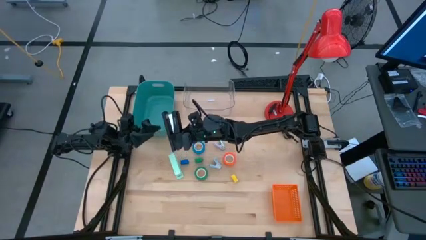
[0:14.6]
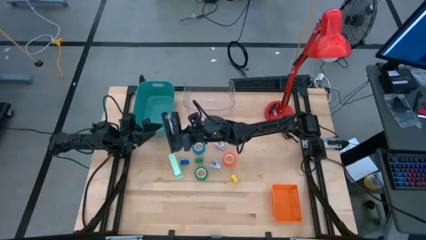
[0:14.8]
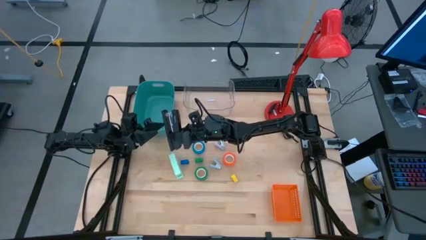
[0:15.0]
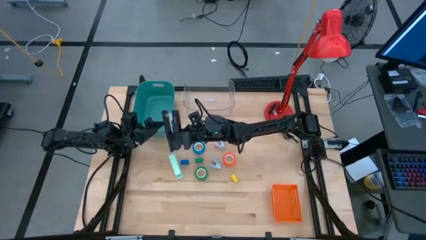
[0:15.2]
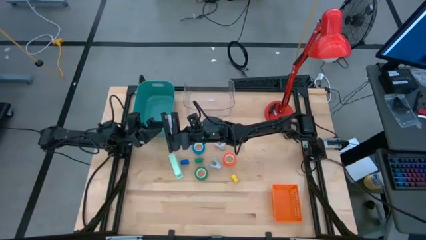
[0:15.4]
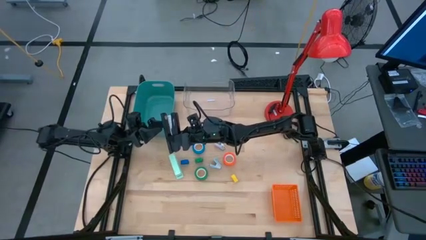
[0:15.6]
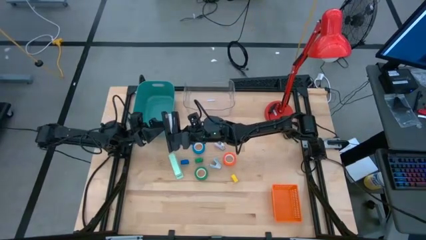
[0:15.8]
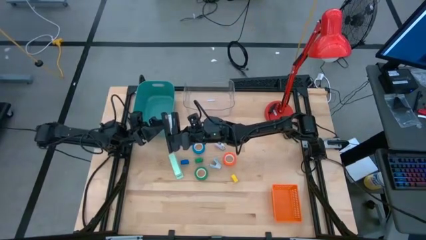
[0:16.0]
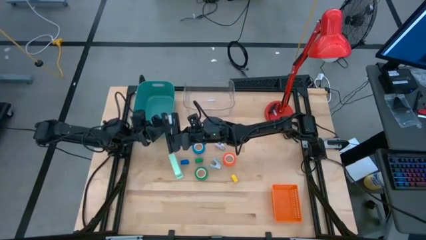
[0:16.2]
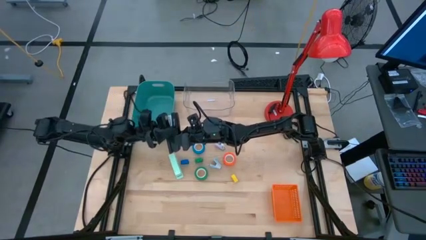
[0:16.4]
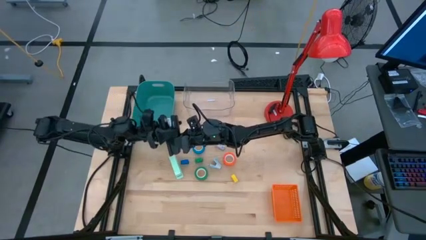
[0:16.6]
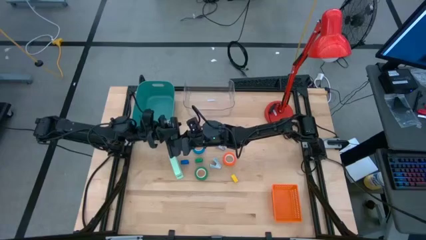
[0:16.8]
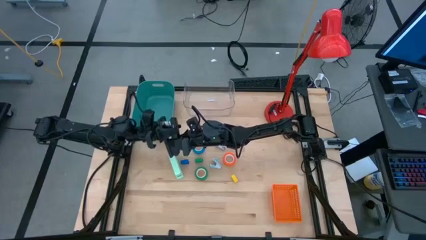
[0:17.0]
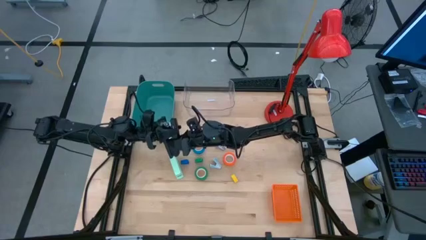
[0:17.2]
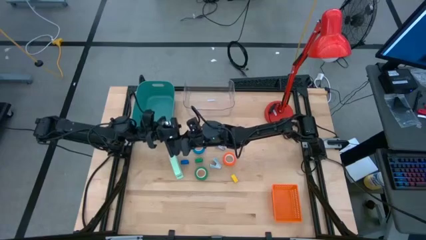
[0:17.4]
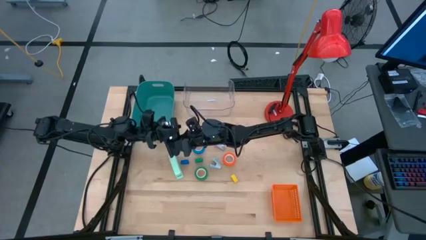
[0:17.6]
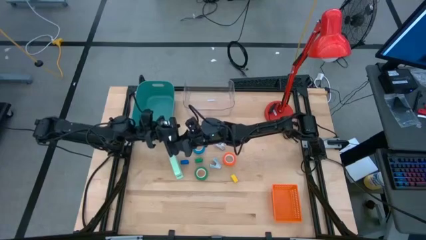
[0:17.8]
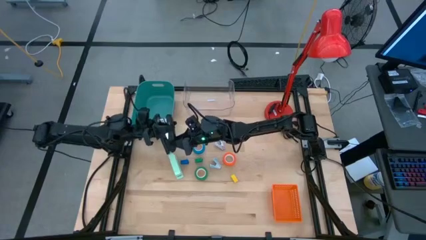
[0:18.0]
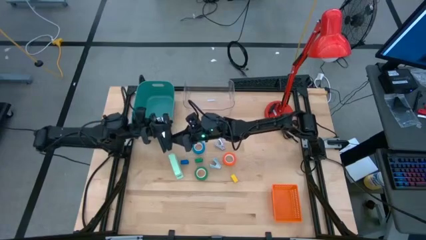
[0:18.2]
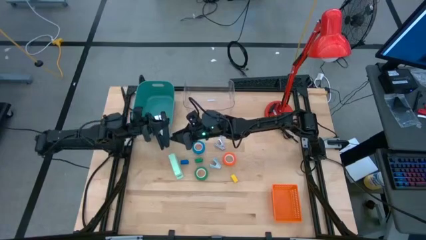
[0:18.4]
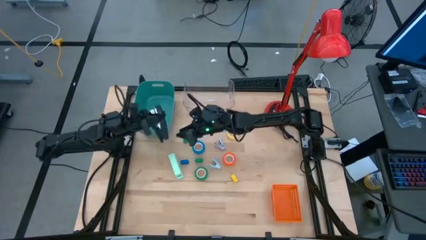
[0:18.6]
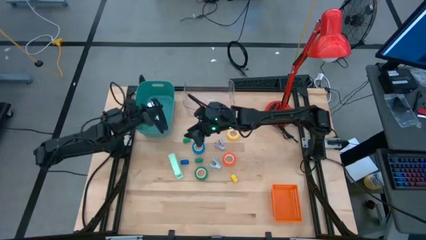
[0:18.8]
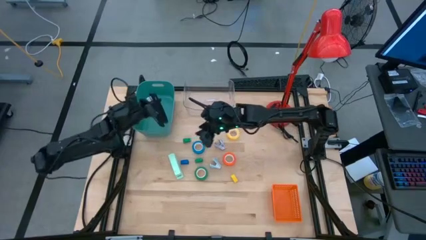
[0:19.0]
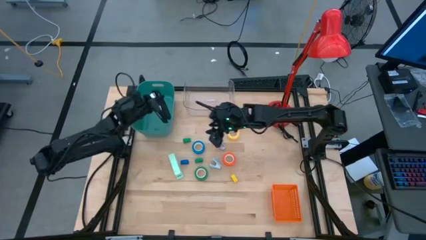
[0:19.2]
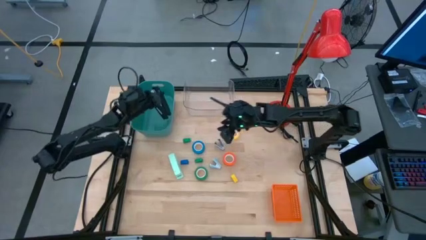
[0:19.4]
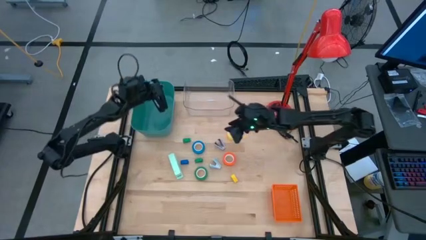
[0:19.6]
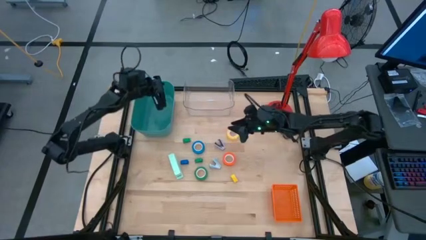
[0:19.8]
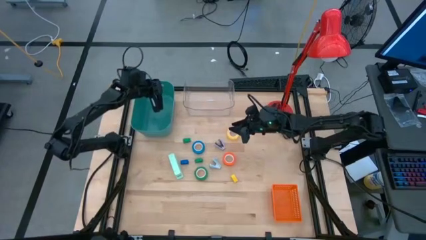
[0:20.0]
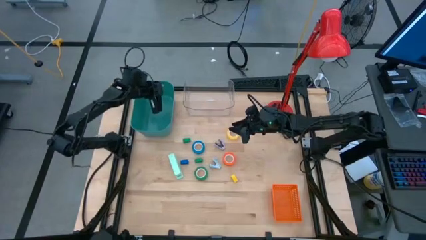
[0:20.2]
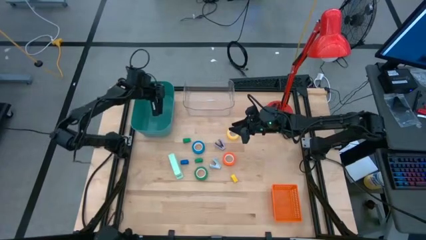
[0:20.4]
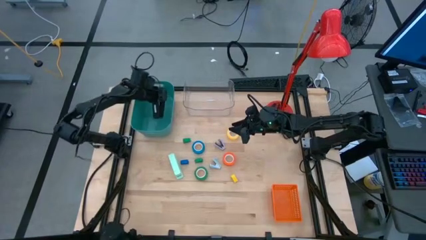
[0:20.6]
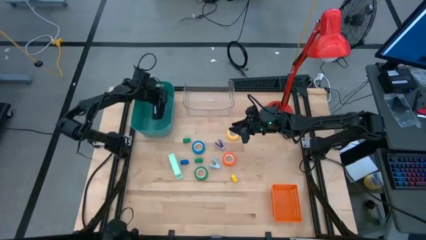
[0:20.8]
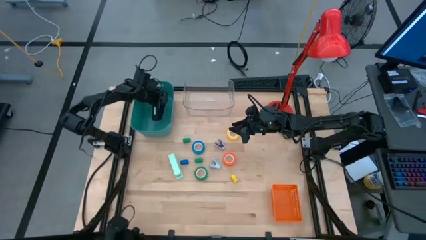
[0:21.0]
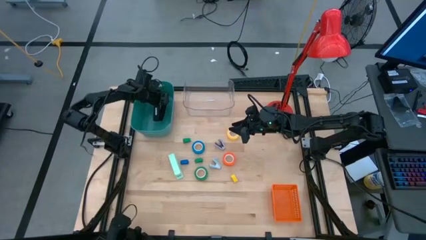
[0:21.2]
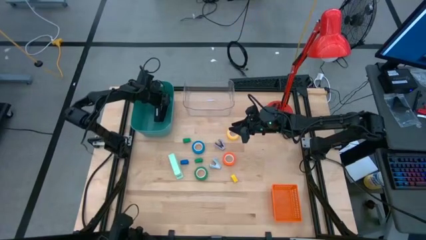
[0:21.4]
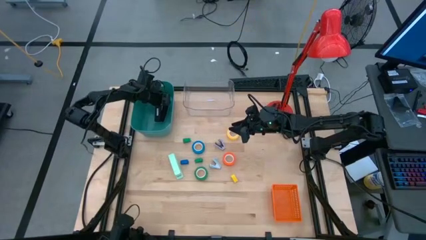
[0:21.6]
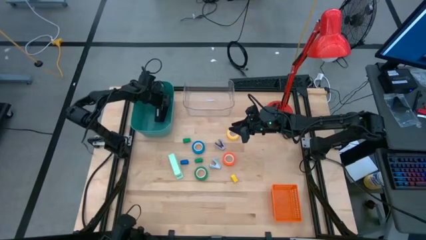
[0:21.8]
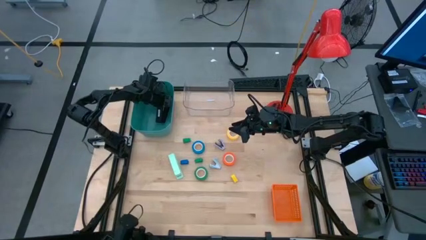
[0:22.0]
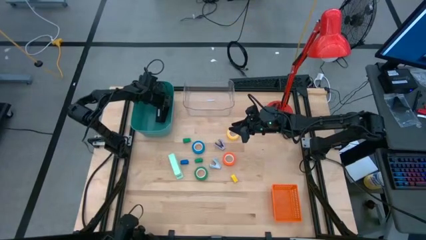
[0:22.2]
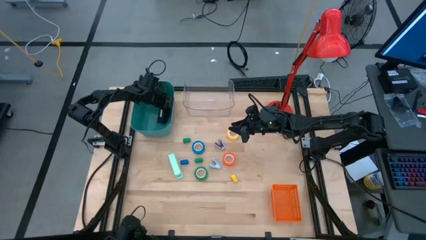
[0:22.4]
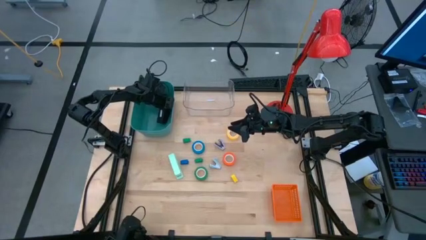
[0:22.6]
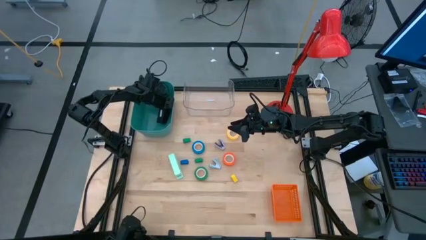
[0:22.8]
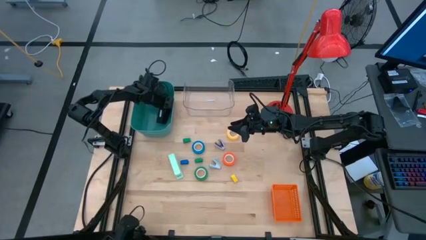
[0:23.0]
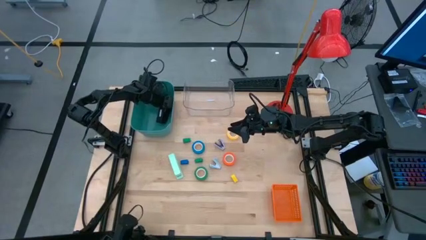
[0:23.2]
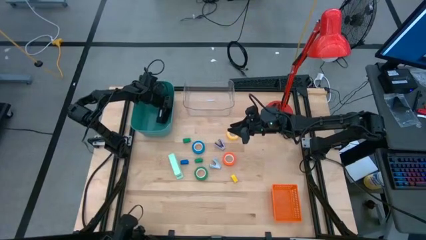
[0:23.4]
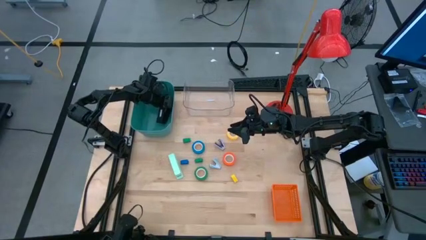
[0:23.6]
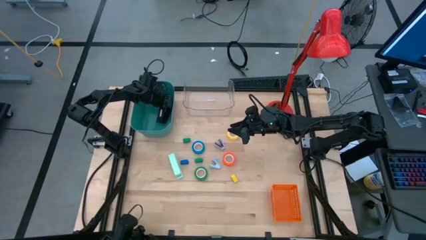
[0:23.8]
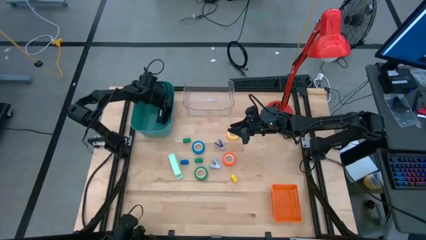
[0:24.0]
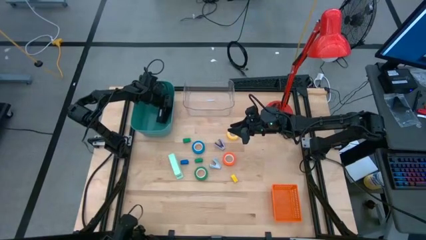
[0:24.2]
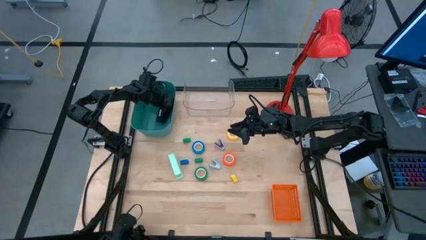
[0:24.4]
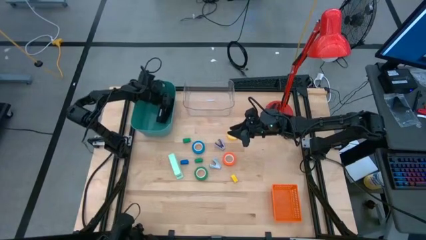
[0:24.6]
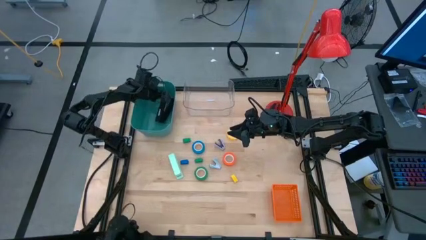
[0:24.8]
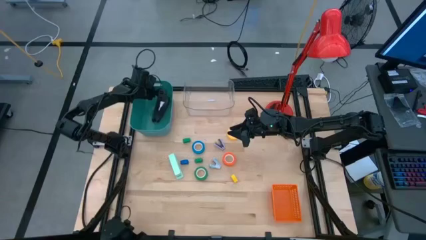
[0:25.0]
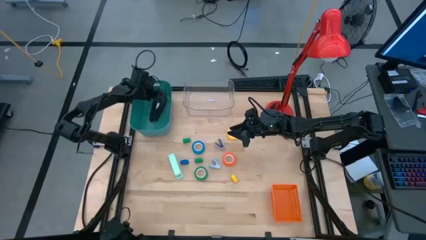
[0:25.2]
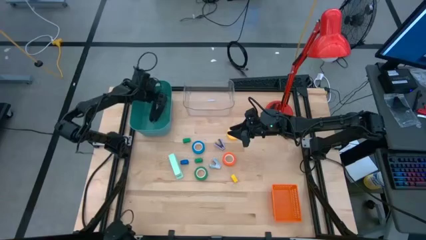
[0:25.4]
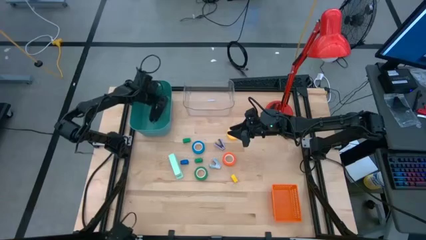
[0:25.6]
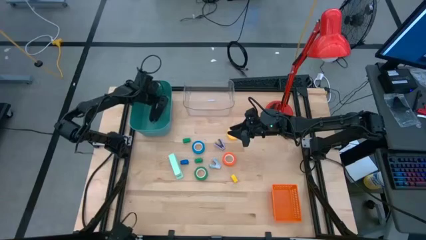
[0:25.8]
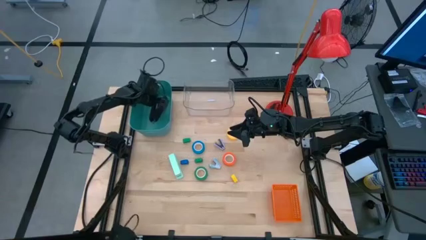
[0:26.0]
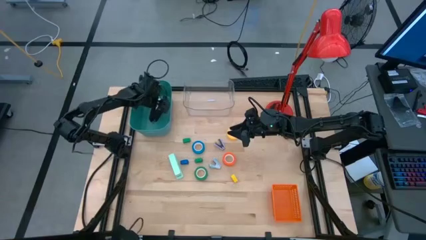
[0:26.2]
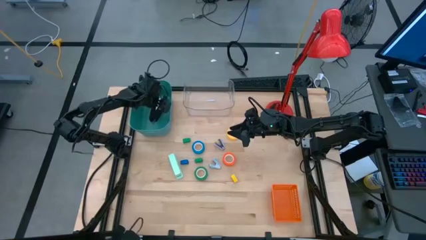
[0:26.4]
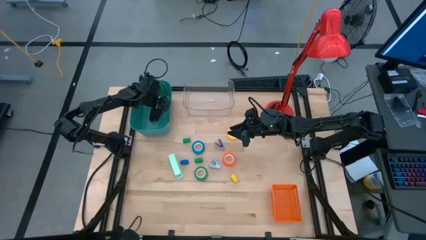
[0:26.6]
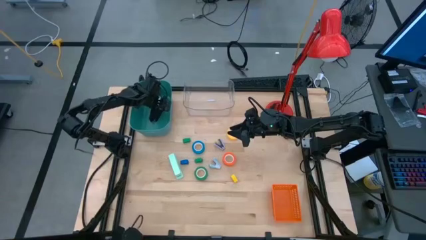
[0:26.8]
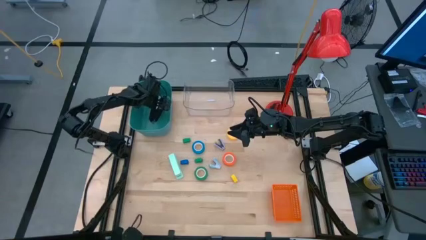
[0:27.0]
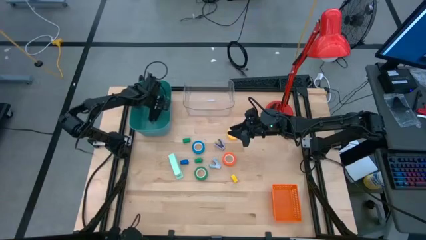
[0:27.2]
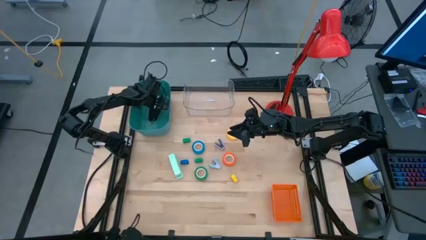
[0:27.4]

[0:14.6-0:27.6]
Task: Pick and place Stapler, Stapler remover, tape
Put the black stapler into the green bin
